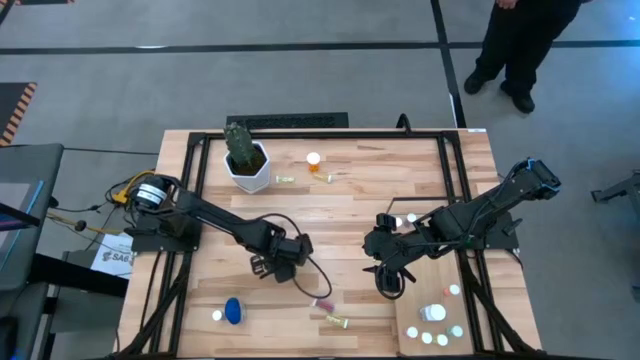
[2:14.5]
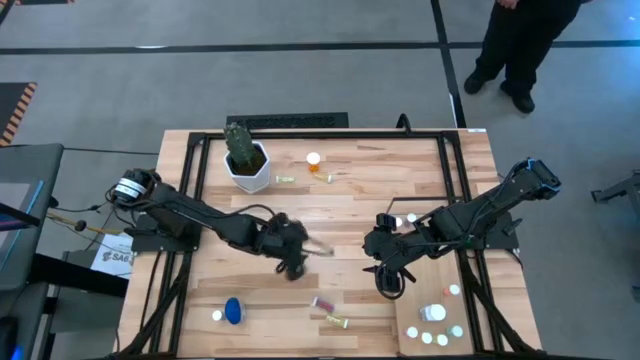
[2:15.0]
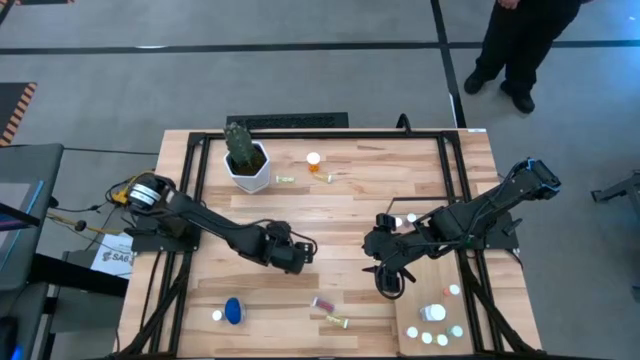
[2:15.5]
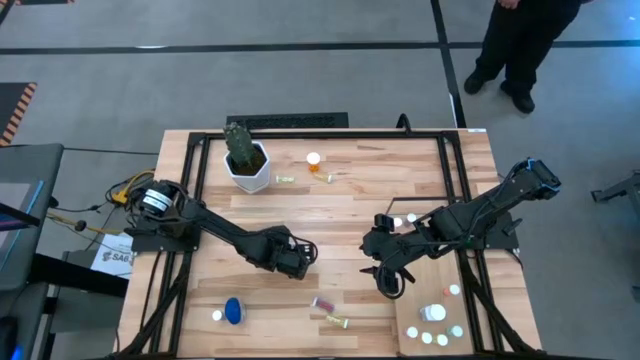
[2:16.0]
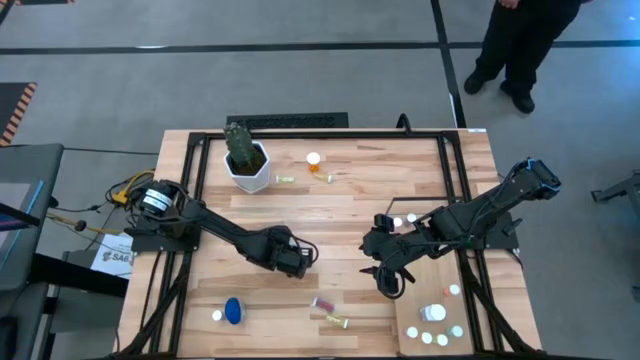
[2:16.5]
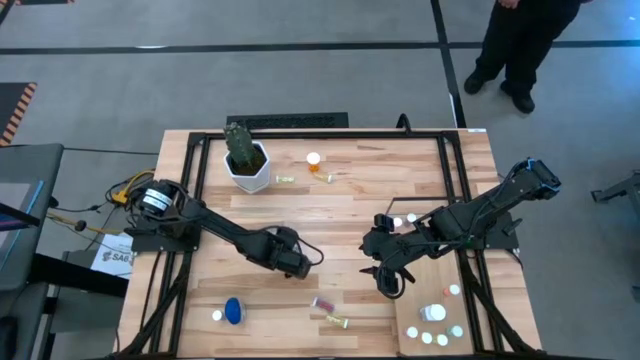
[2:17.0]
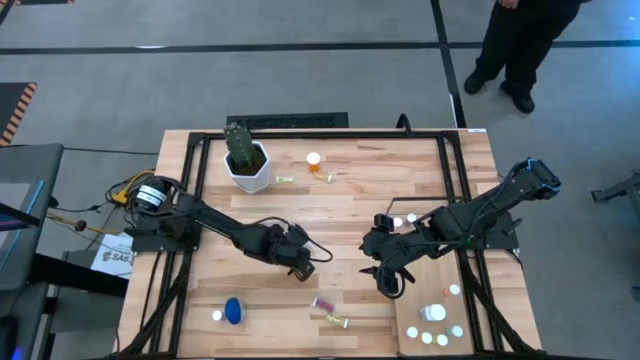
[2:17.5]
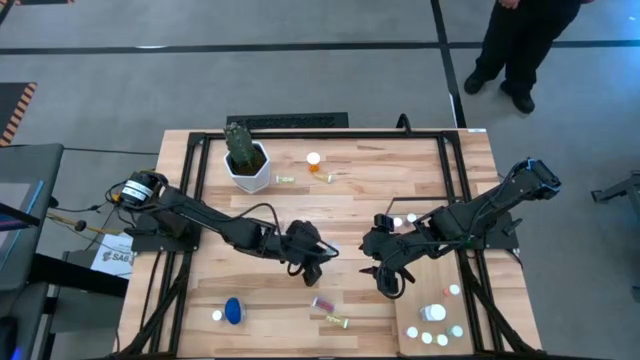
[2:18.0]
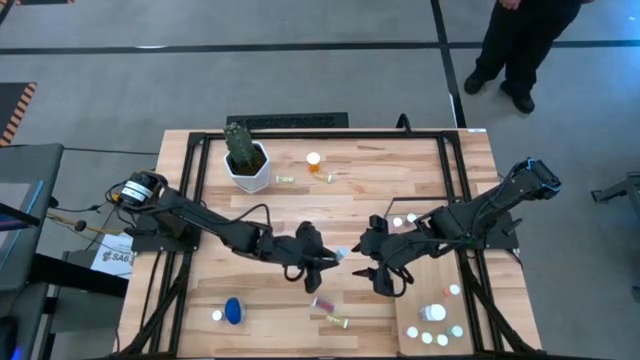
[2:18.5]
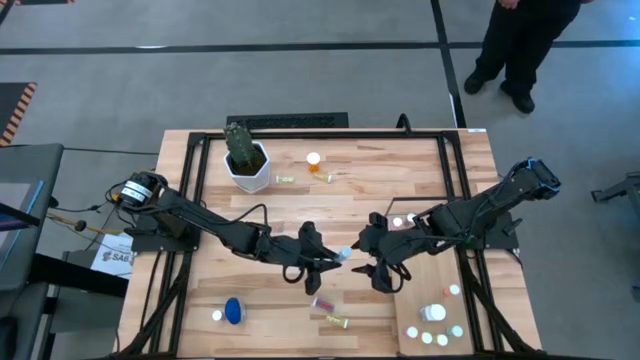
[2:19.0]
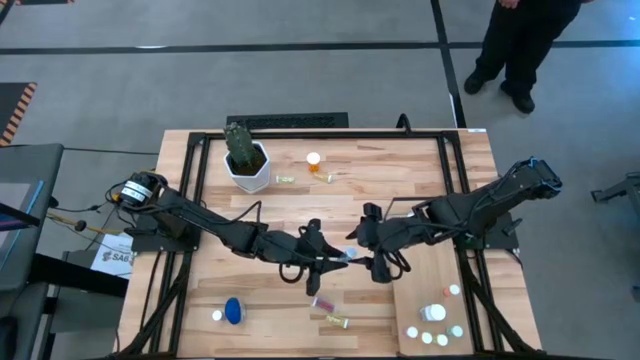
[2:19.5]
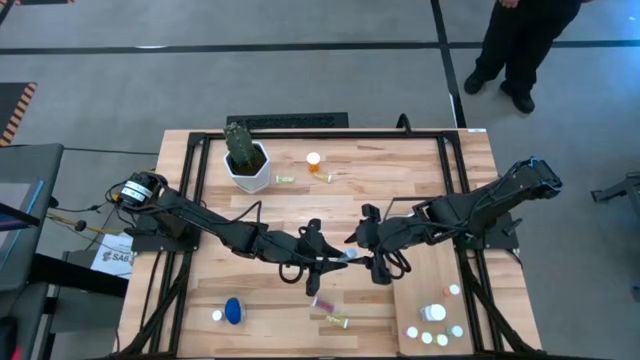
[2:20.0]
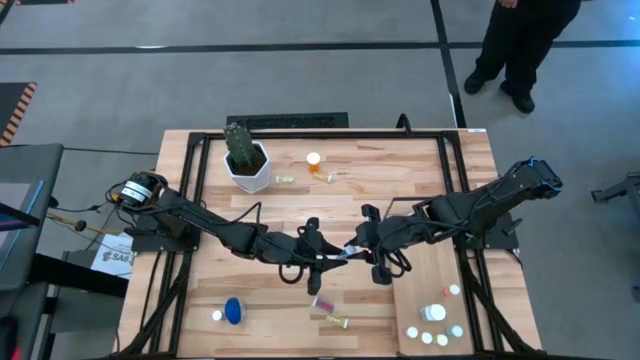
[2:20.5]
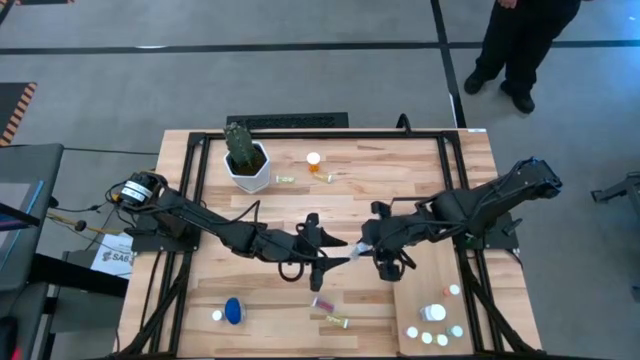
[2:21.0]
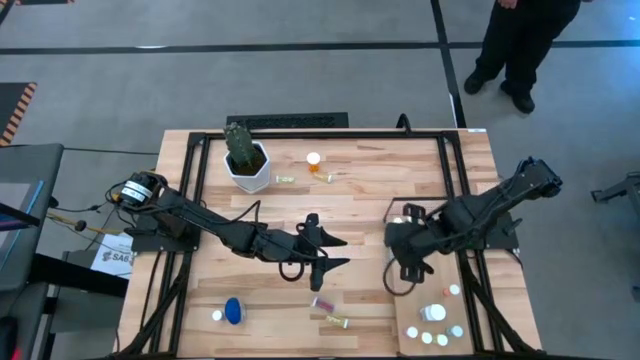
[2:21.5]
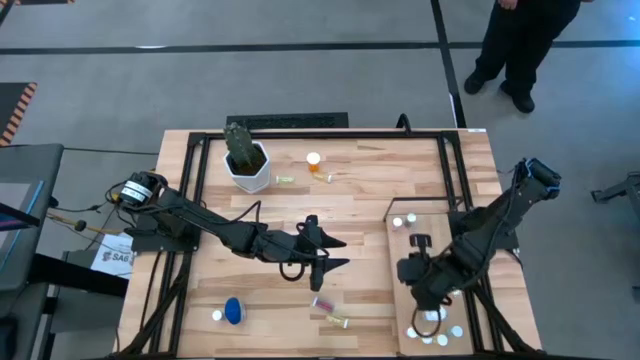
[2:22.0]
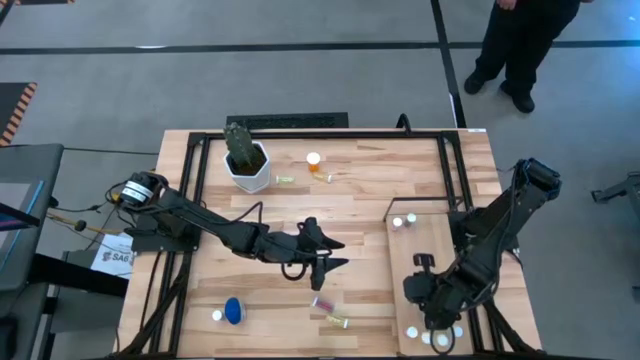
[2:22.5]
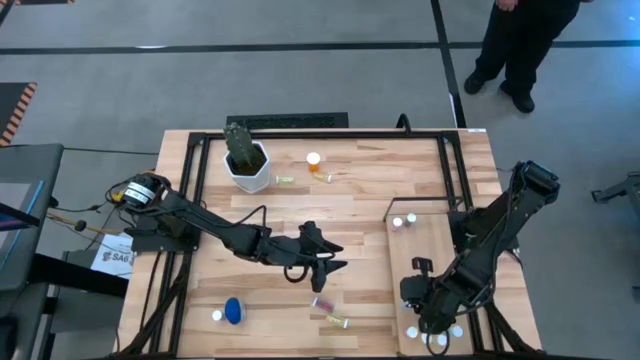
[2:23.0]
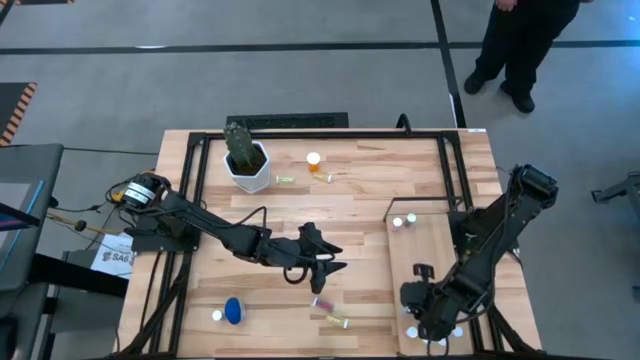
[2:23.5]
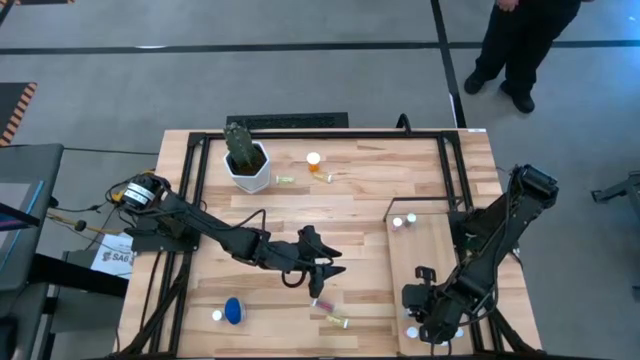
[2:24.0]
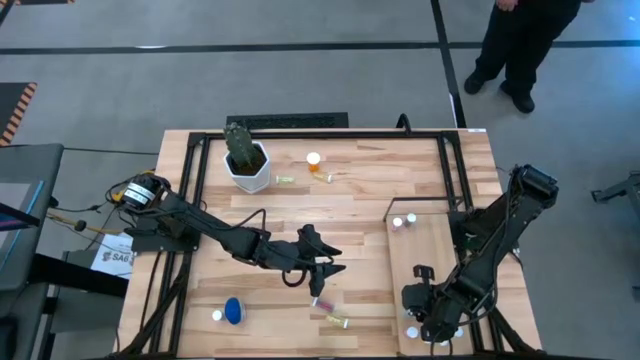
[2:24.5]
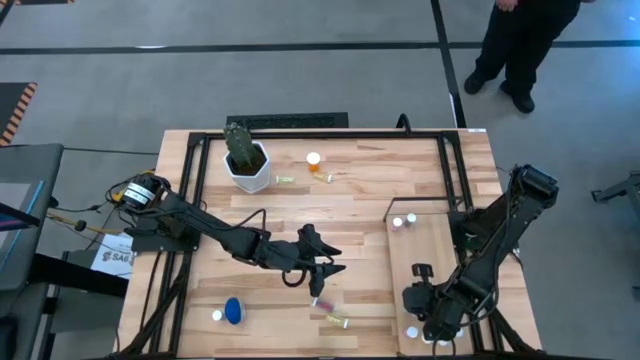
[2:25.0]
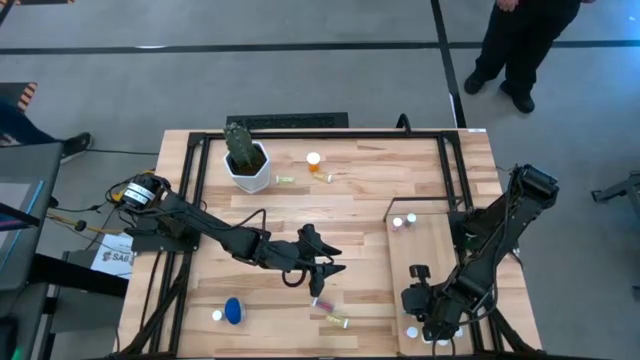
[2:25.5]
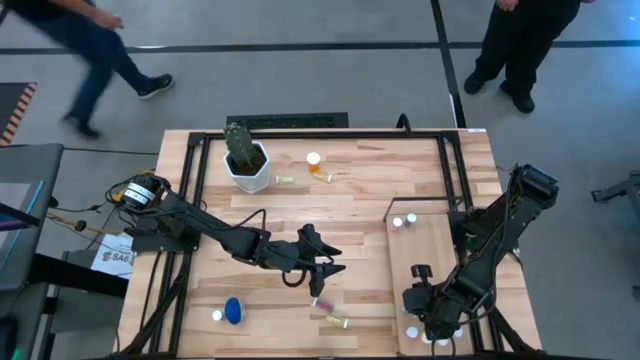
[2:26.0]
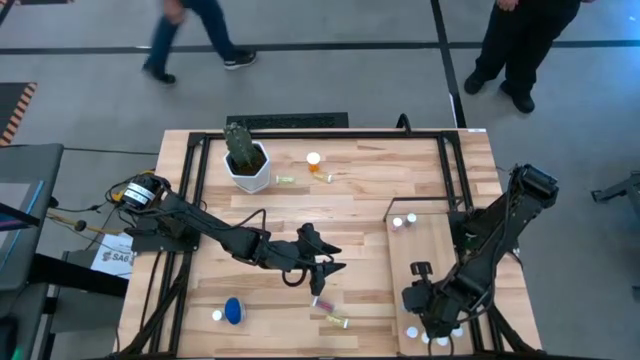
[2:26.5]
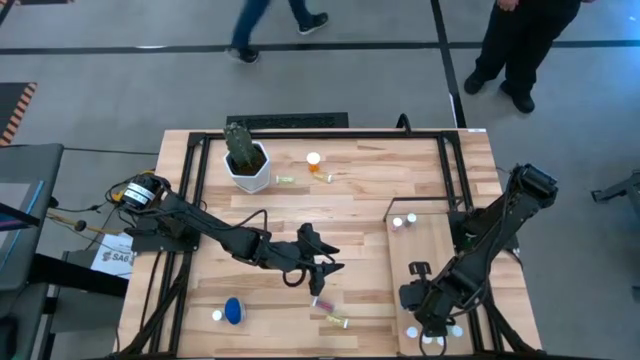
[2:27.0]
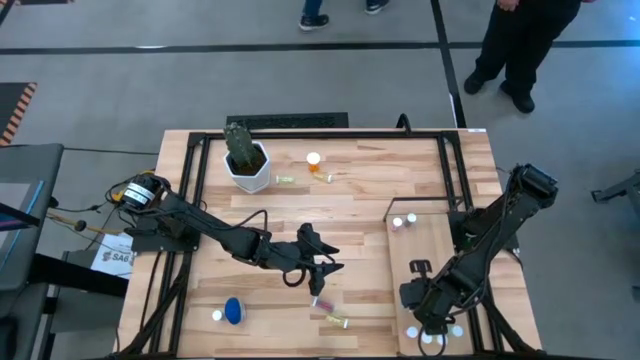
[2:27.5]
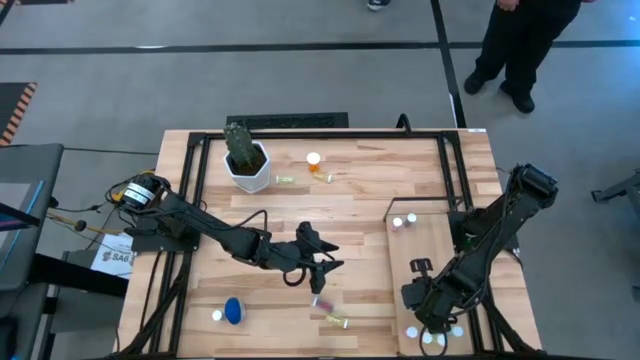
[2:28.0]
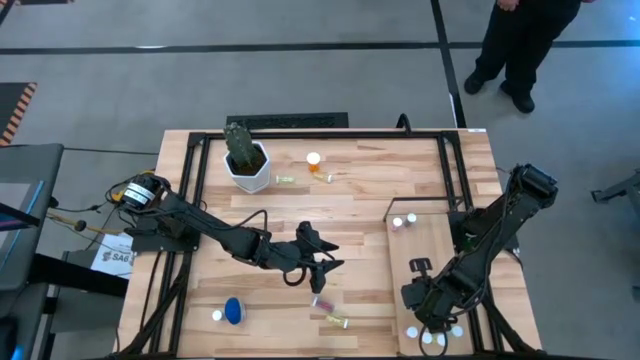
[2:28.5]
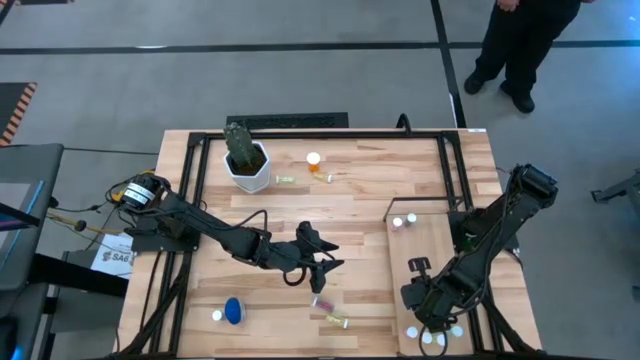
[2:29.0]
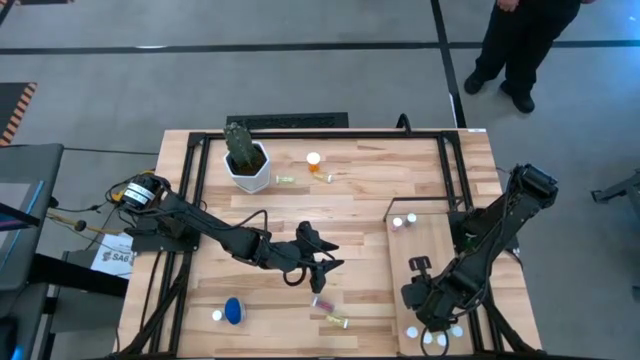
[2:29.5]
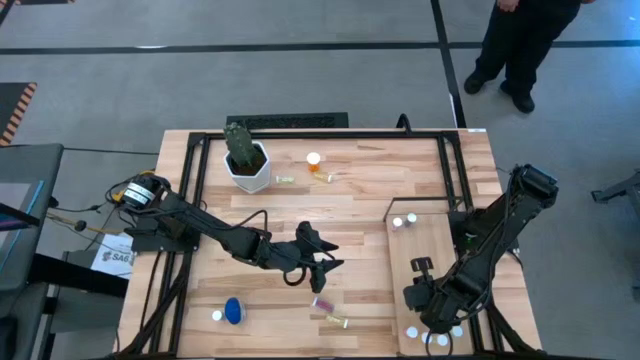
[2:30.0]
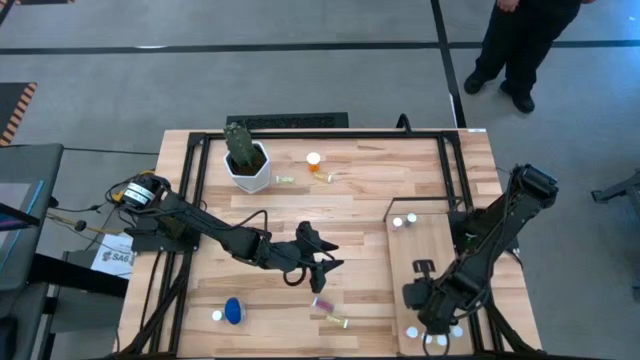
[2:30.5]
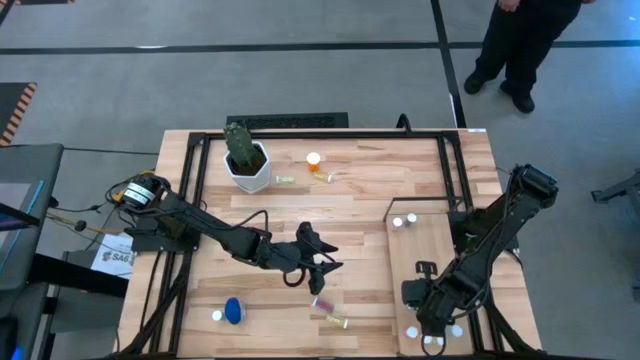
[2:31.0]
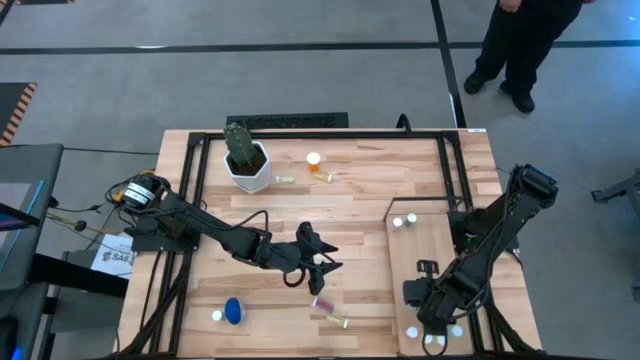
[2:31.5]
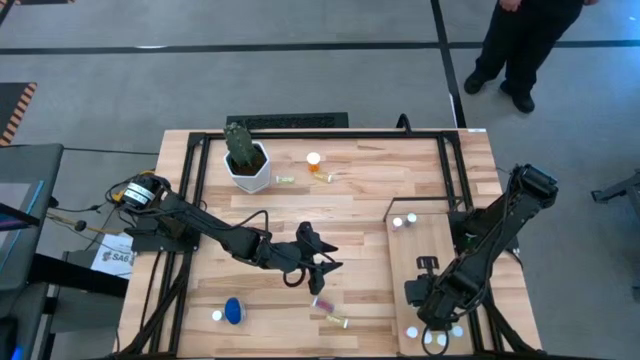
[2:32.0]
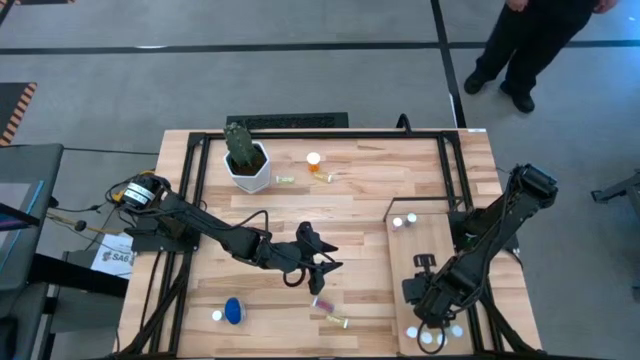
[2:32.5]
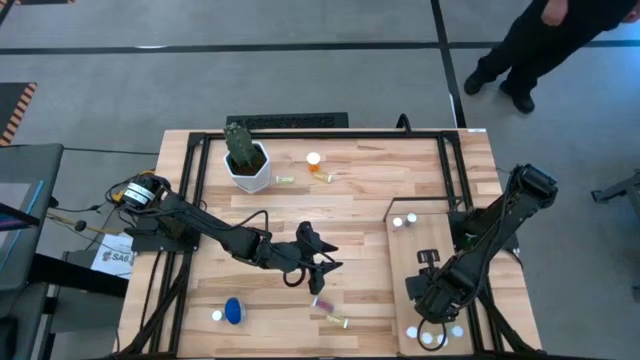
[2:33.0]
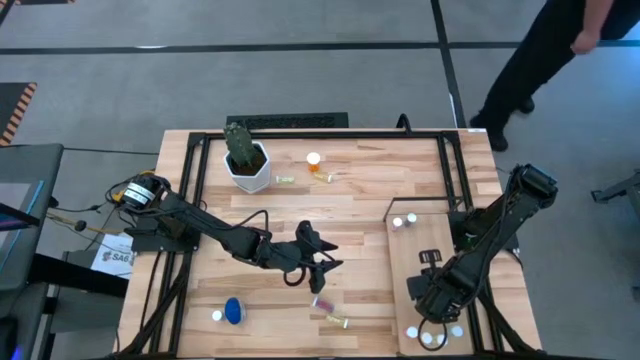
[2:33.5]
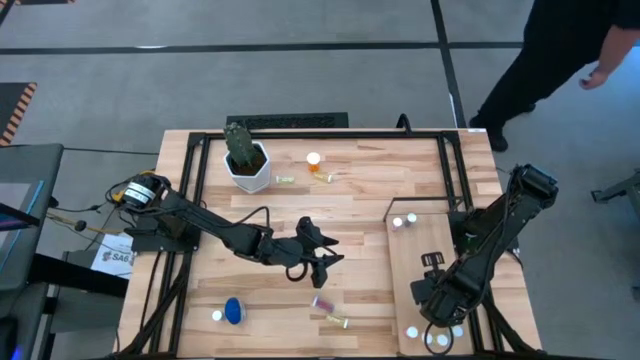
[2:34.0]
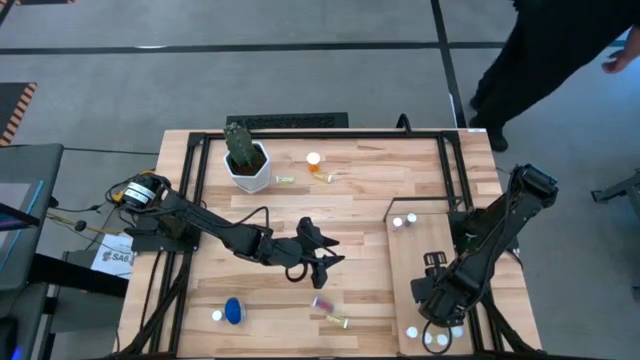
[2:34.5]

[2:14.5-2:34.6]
Task: Pick and place medicine bottles onto shelf by color
Put the blue pill bottle on the shelf
